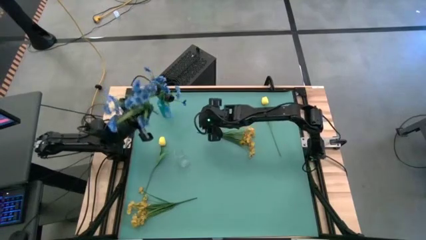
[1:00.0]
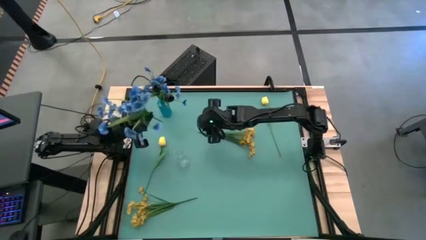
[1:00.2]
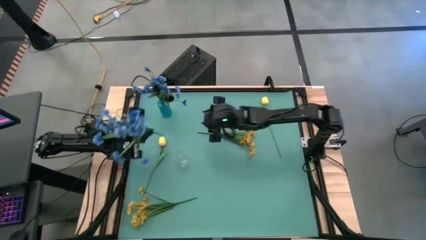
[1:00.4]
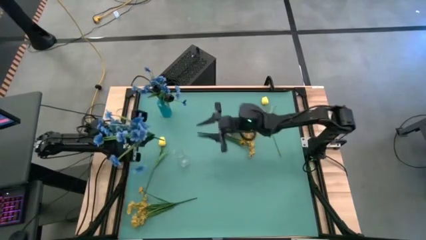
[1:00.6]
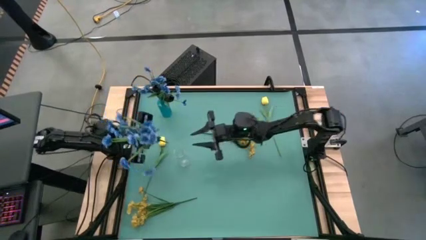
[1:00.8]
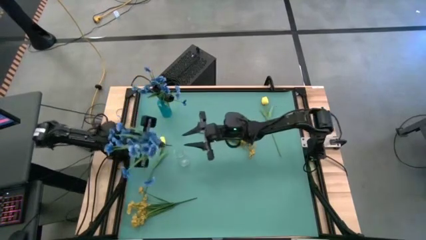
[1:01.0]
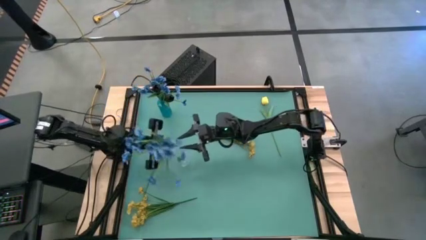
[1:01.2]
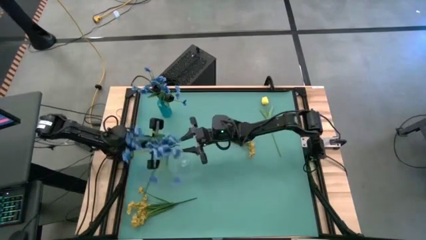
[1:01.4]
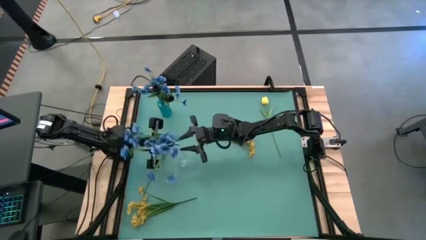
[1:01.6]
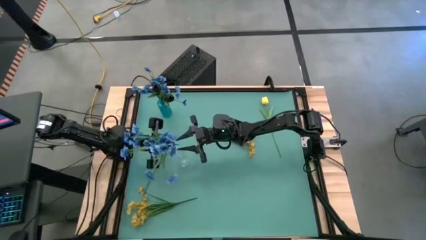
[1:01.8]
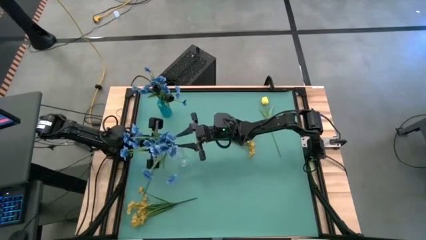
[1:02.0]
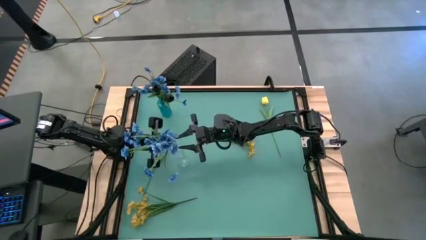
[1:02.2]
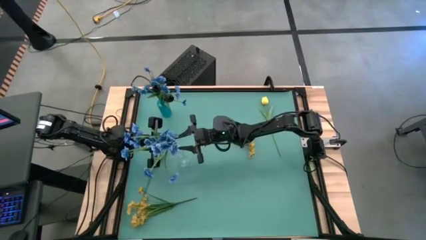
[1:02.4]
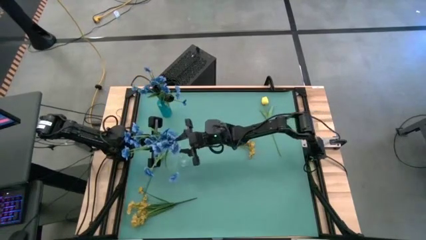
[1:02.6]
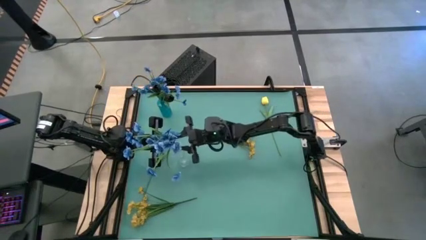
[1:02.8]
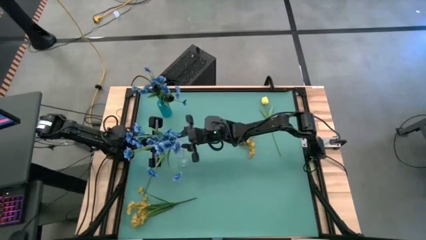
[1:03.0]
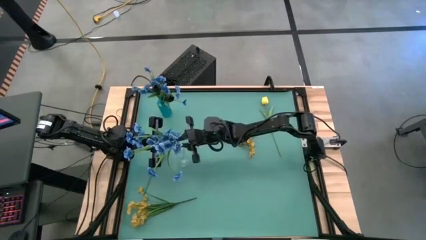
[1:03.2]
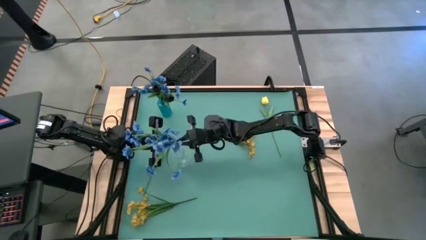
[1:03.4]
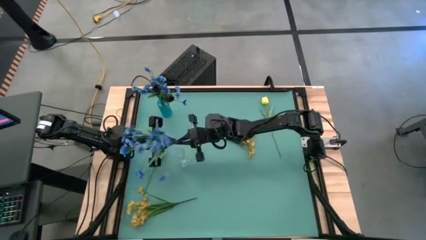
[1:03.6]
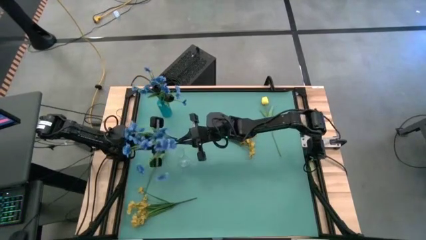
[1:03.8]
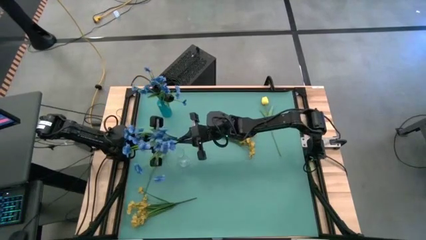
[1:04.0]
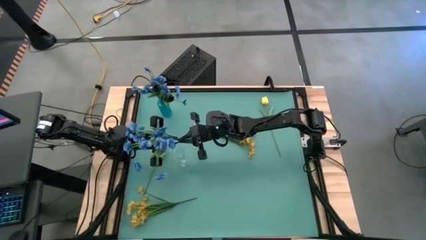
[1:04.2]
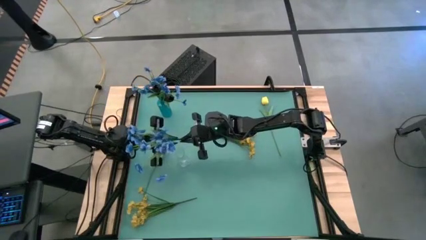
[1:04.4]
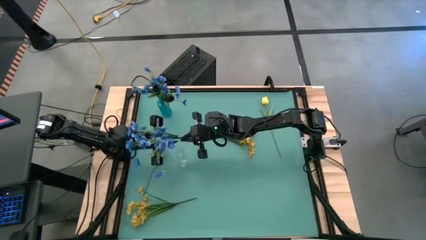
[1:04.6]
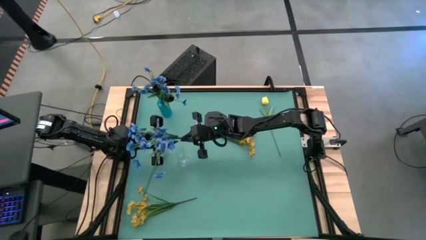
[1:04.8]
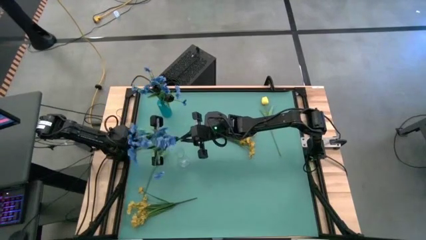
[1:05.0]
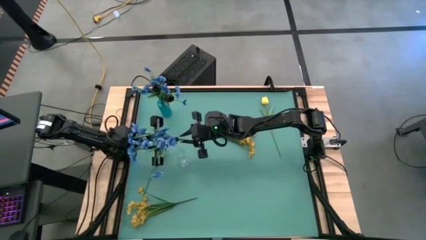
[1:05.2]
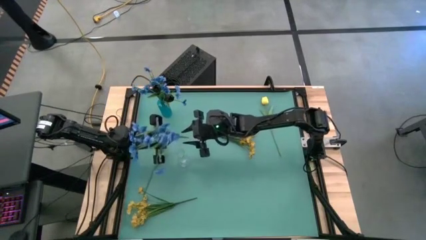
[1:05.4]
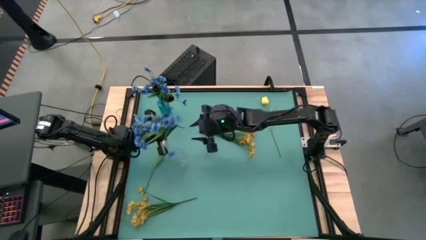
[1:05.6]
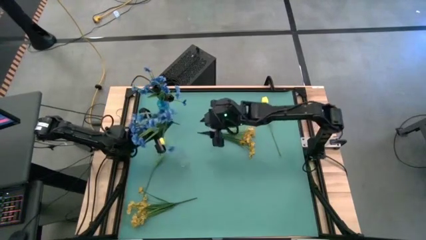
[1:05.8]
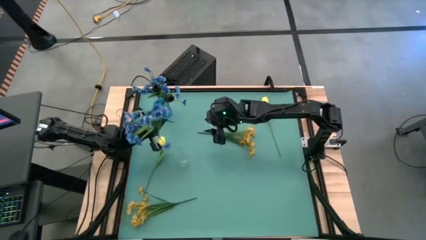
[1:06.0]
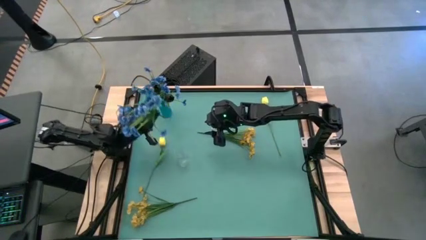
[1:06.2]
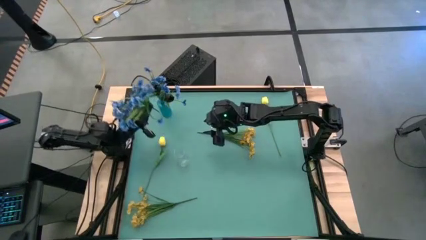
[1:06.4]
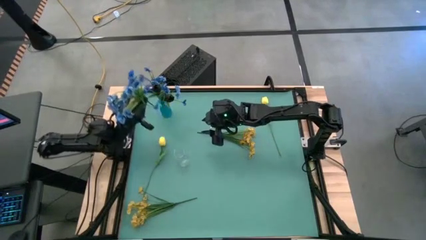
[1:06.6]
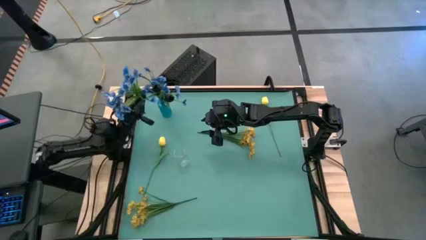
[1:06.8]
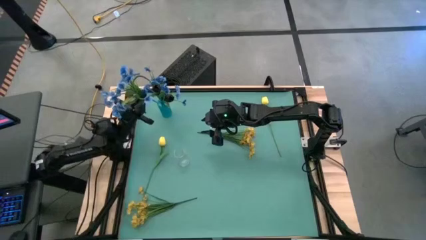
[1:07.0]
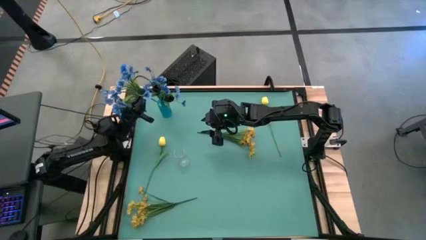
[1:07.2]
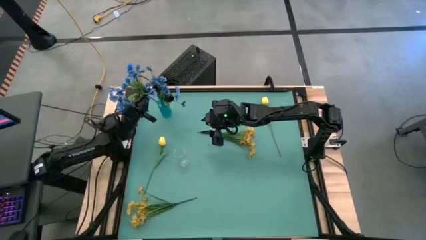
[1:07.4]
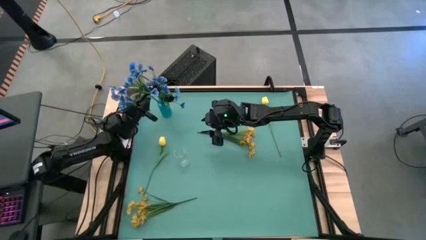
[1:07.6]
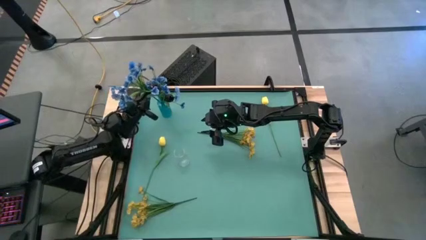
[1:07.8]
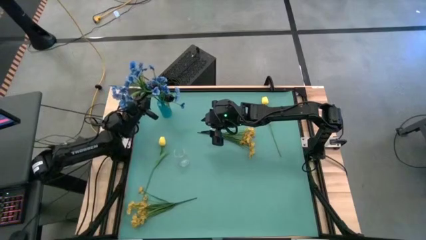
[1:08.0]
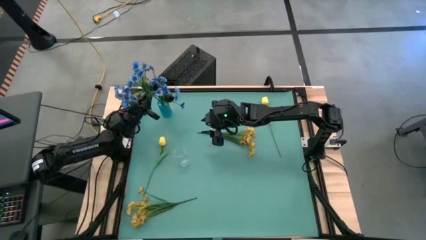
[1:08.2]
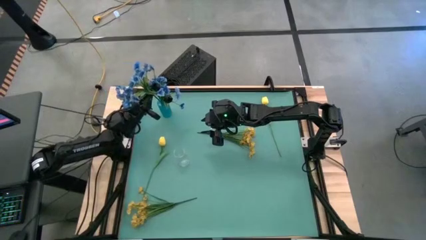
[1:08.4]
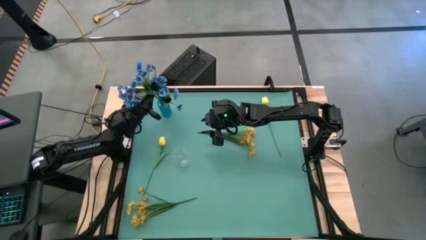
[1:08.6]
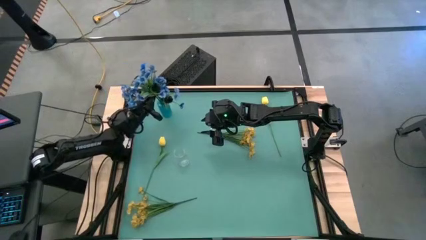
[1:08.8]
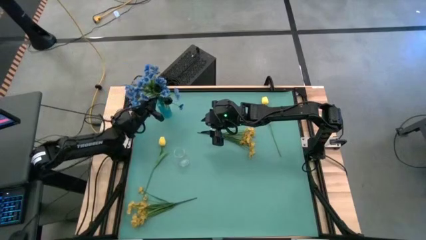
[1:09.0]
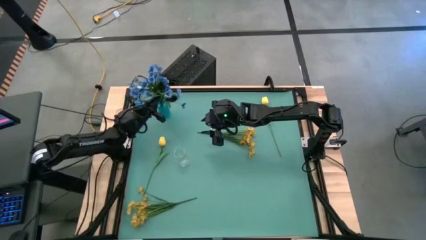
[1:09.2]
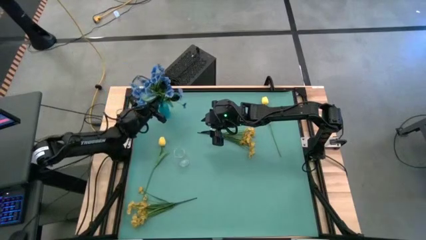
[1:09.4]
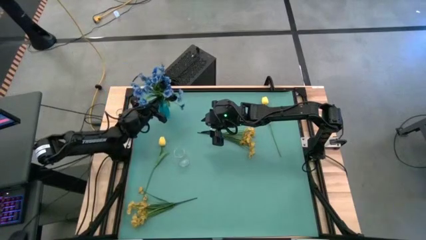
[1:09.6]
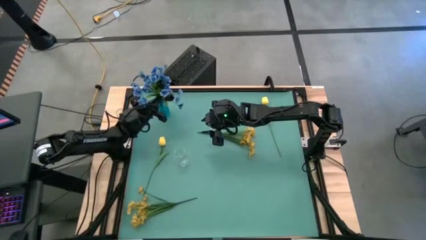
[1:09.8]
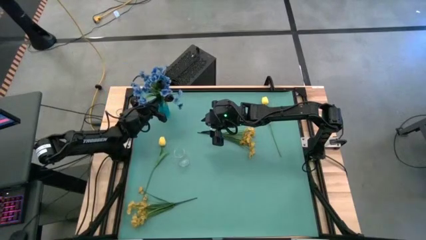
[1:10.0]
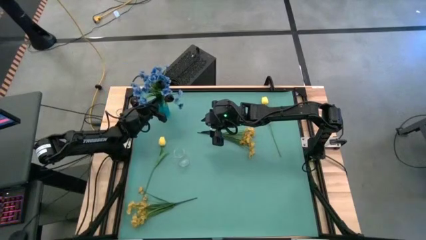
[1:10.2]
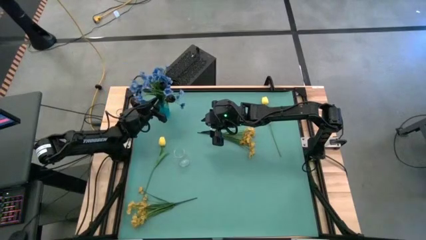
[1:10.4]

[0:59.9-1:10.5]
Task: Sort flowers into vase by color
Put the blue flowers into the blue vase
